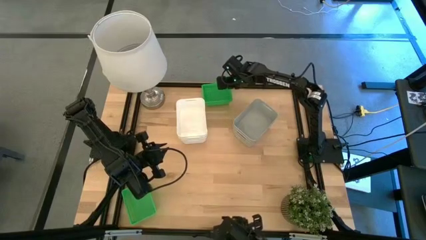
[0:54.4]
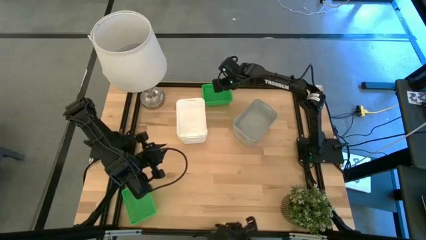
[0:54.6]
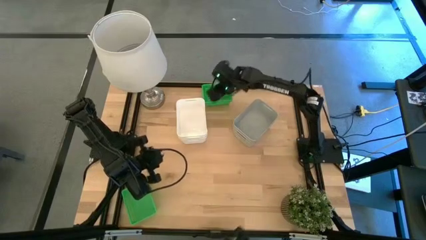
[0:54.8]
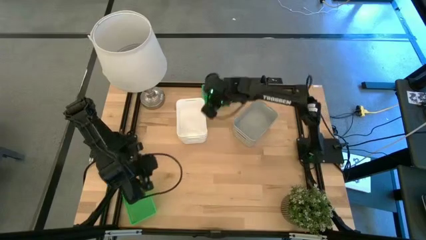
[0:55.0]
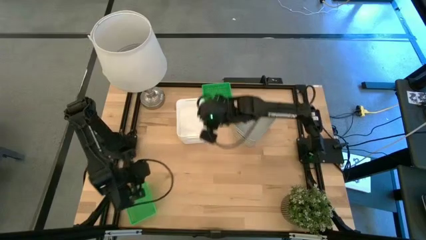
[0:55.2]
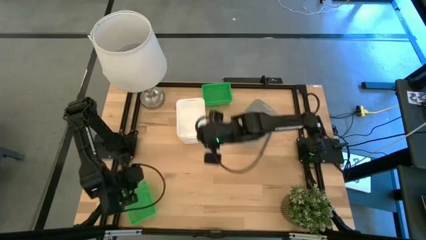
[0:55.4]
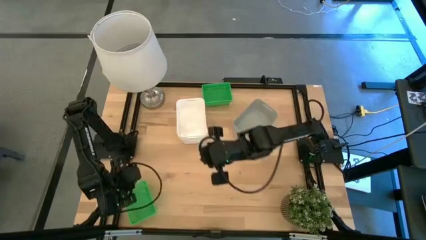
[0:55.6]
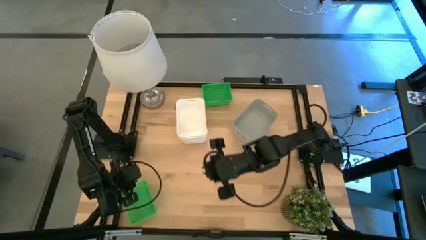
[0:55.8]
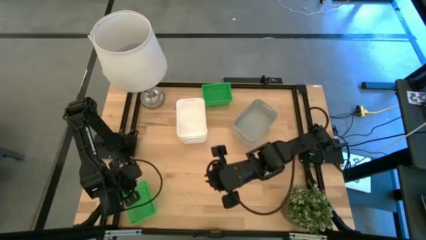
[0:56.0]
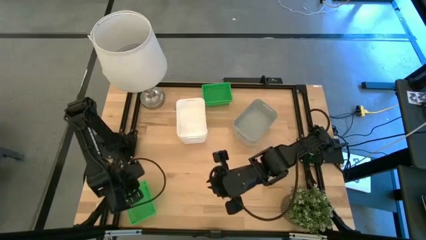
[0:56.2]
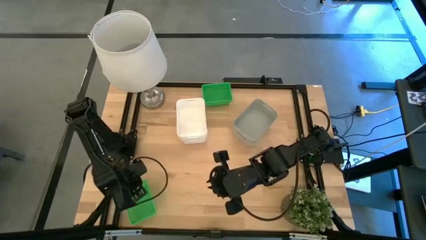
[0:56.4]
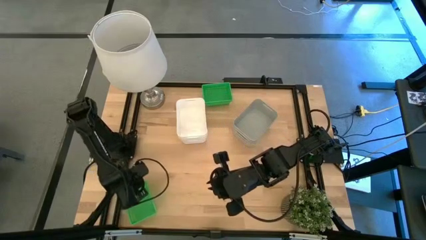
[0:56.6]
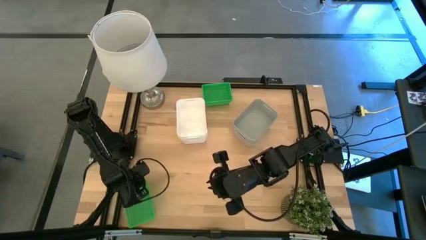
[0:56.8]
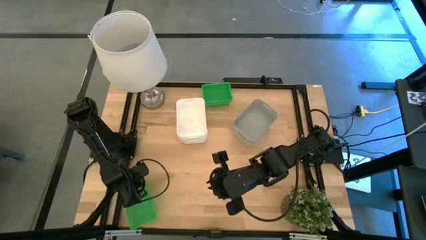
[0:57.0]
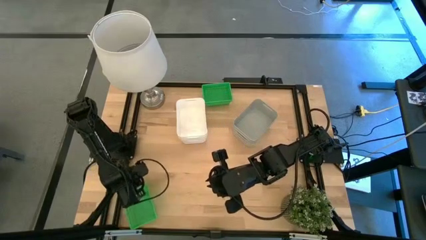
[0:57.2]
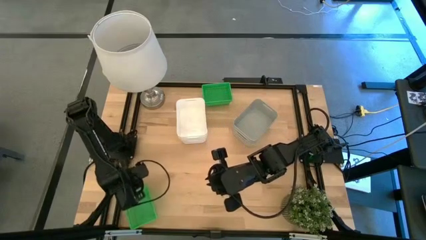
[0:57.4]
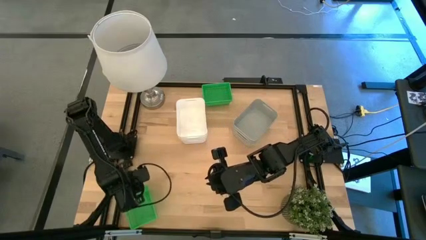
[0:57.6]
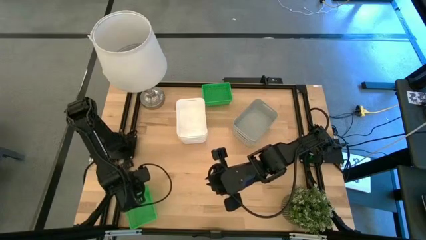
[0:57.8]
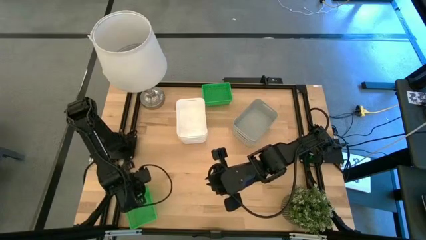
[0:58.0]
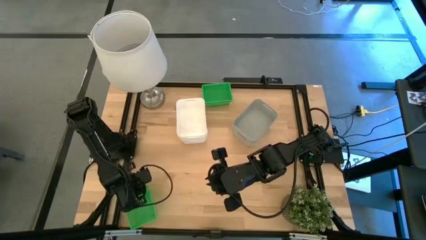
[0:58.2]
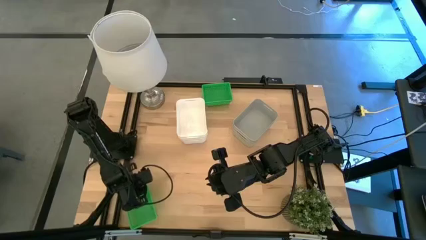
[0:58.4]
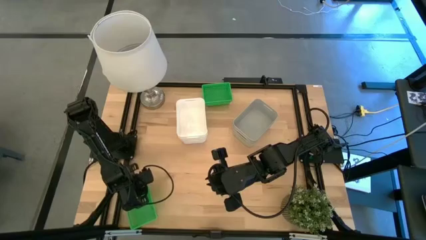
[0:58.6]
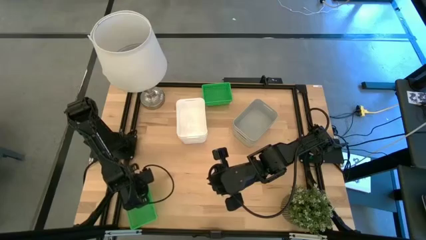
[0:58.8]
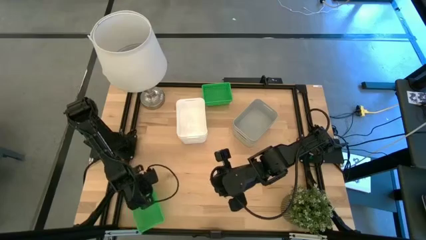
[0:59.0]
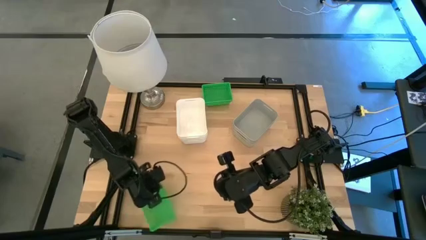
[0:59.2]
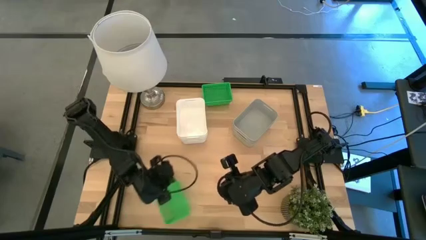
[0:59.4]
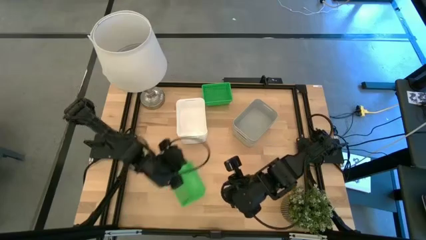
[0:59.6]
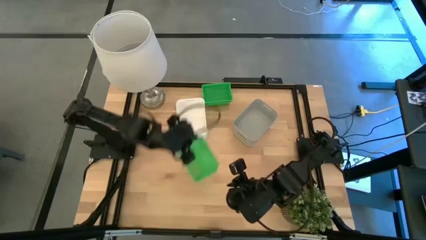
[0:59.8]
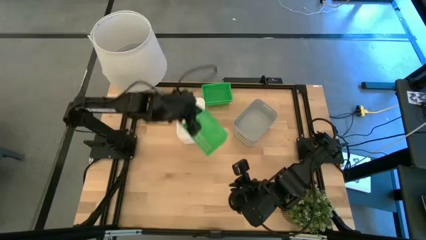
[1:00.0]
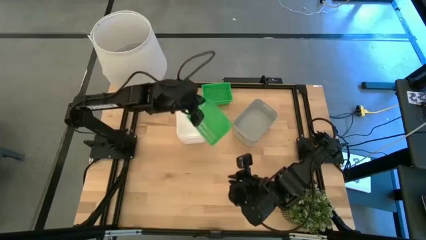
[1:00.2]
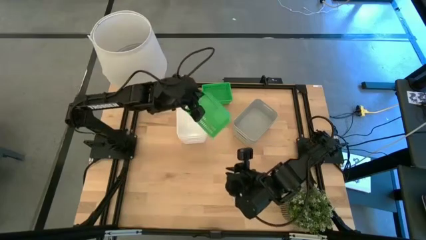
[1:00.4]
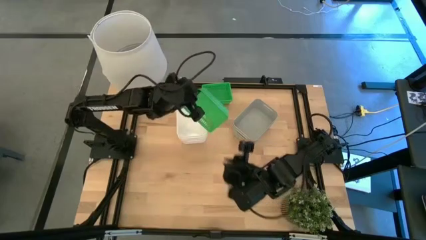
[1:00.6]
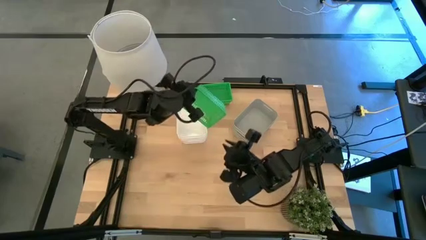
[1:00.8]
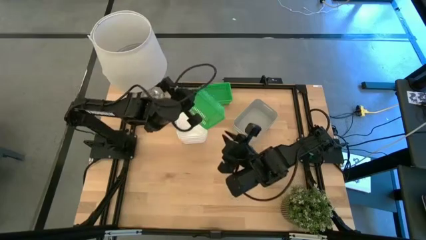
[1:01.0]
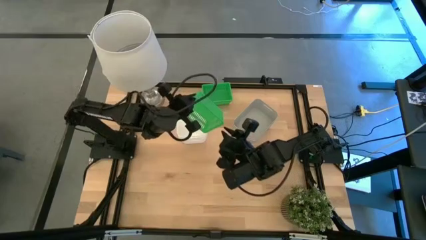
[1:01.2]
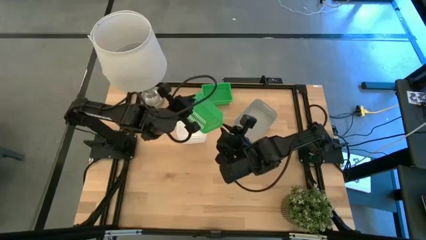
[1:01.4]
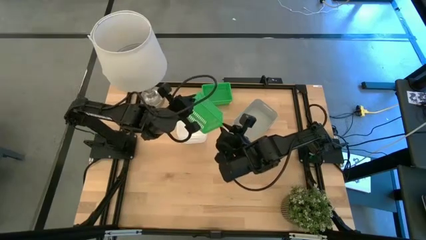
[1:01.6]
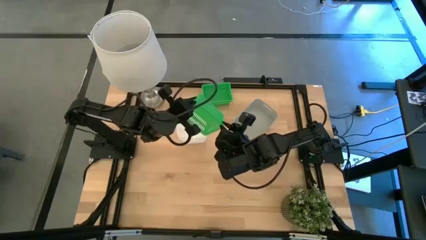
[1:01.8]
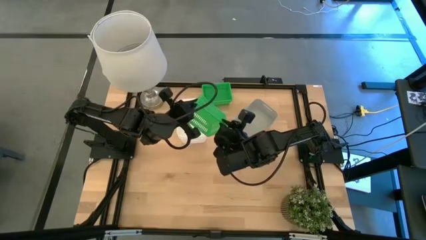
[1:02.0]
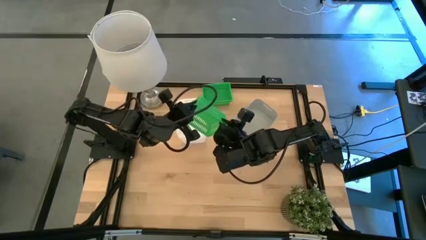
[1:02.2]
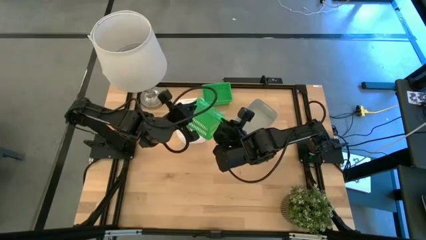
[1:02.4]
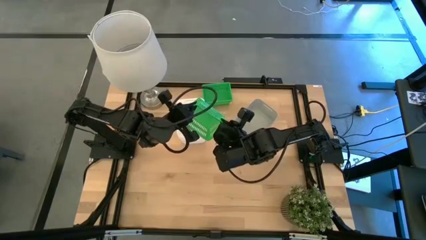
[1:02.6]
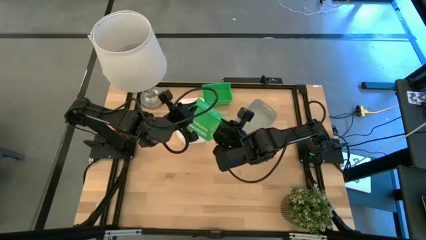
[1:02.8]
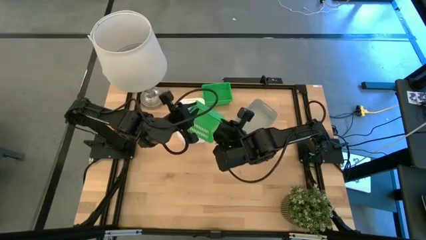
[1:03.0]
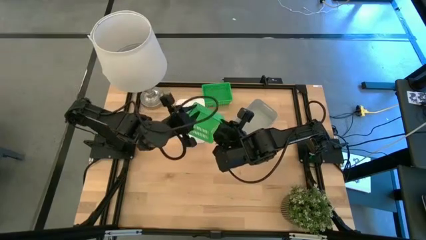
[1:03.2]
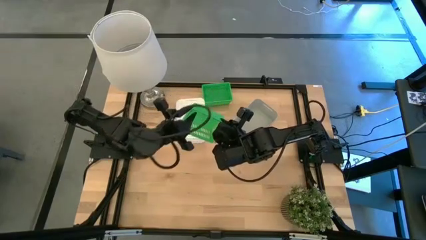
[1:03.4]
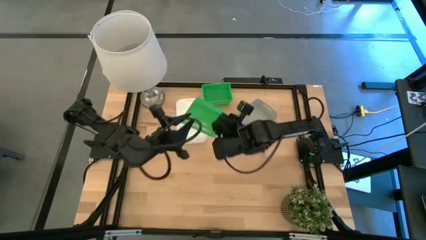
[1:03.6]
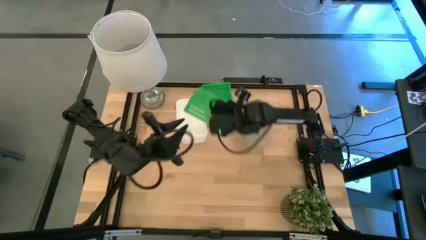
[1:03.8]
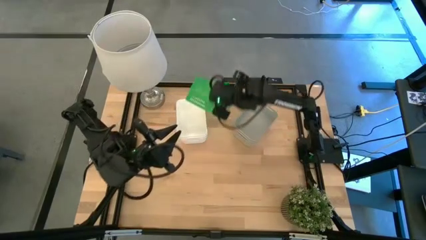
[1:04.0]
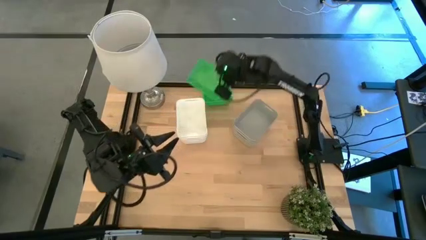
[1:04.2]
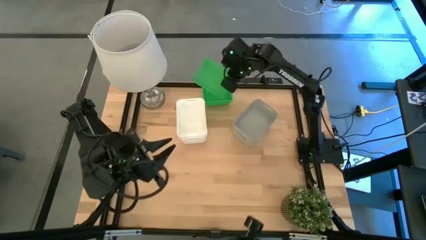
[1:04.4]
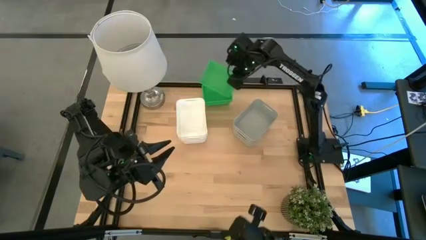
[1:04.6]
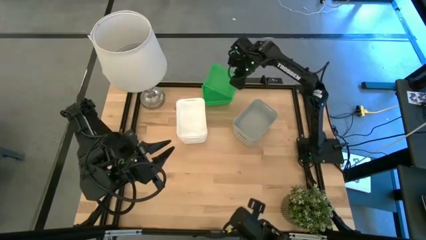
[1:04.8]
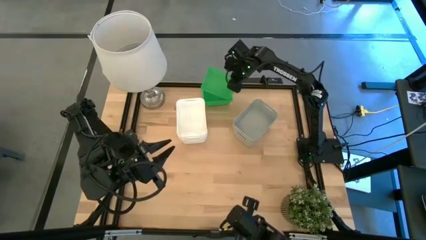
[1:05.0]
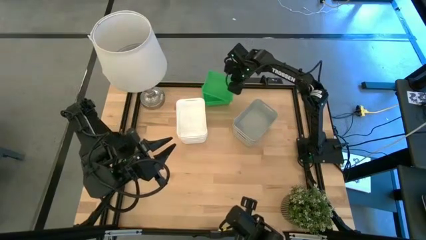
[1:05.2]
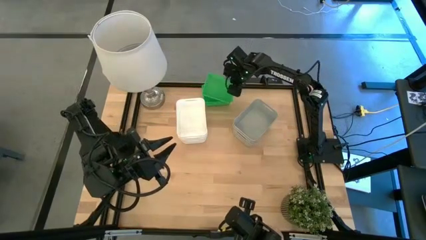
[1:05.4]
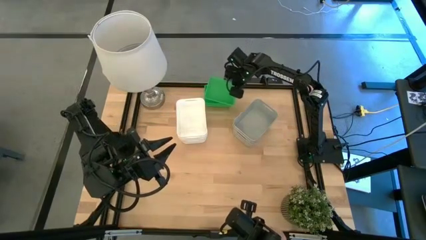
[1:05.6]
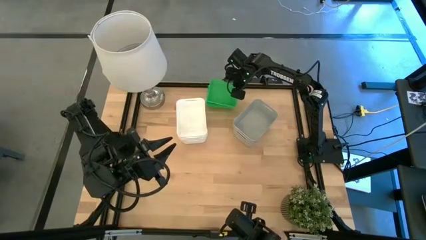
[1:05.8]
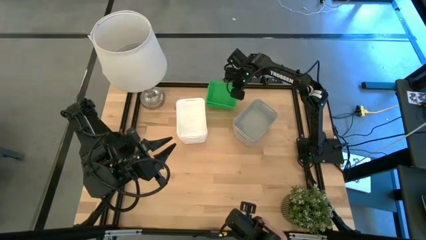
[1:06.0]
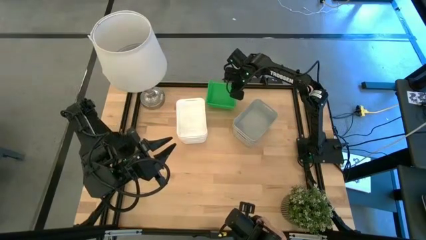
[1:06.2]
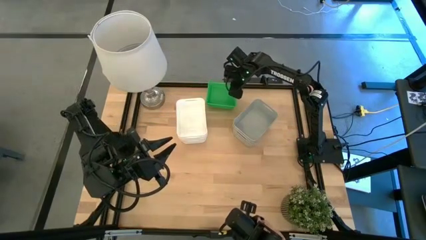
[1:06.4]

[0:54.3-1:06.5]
Stack the bottom green bin on the top green bin

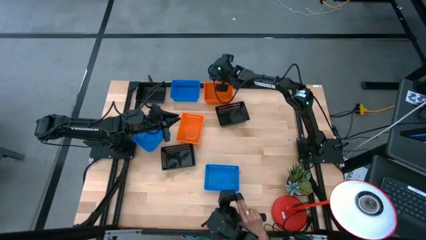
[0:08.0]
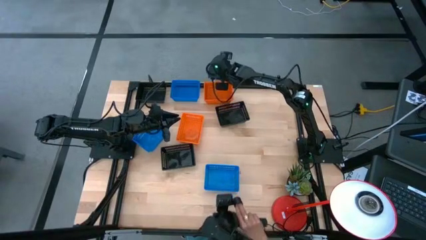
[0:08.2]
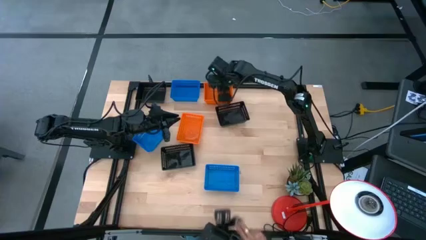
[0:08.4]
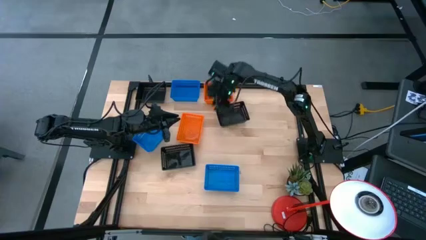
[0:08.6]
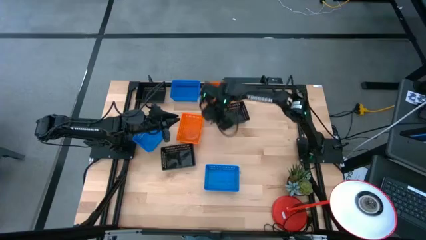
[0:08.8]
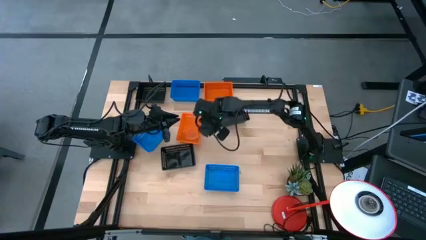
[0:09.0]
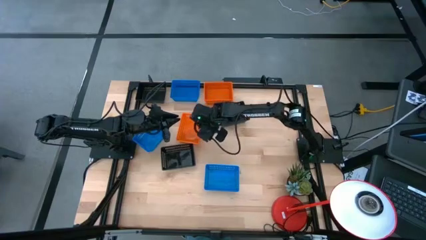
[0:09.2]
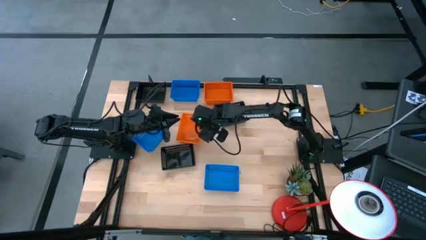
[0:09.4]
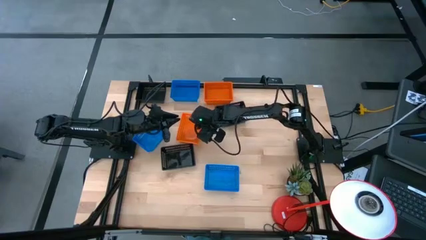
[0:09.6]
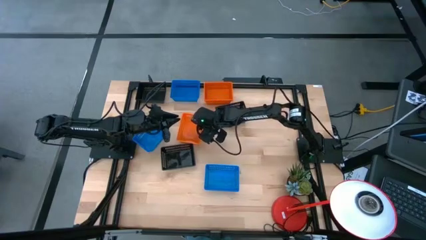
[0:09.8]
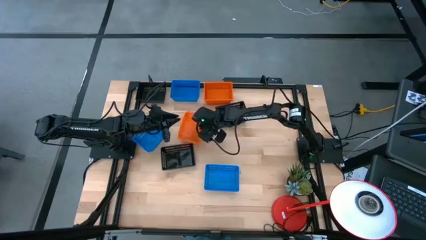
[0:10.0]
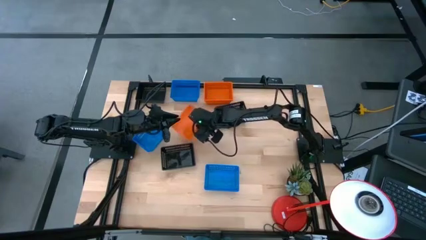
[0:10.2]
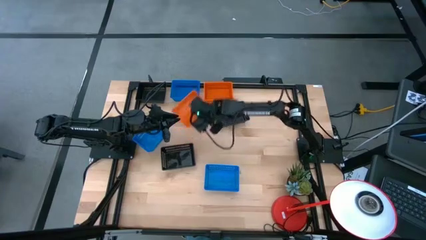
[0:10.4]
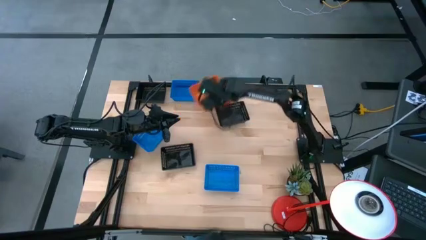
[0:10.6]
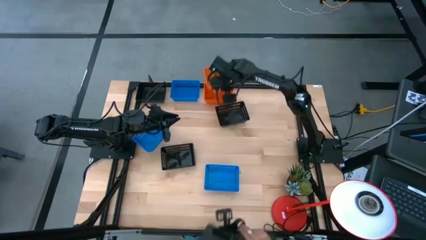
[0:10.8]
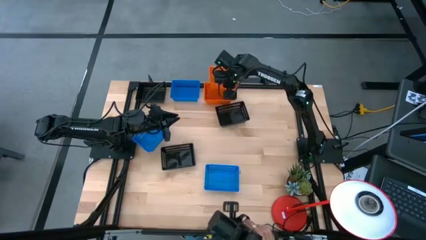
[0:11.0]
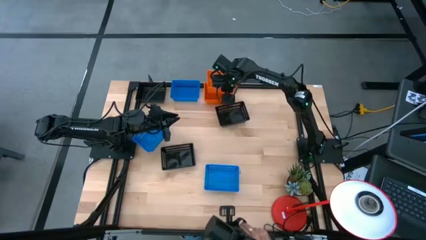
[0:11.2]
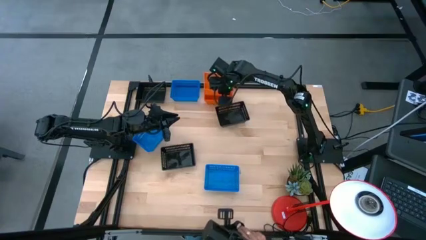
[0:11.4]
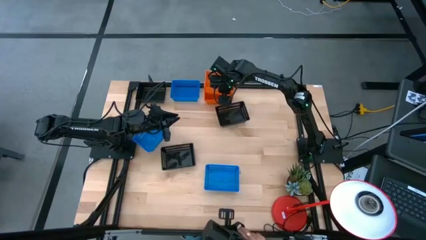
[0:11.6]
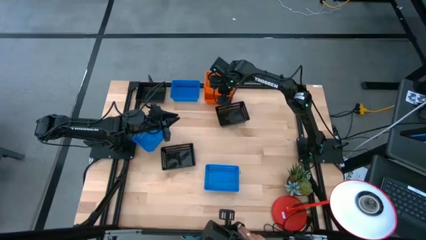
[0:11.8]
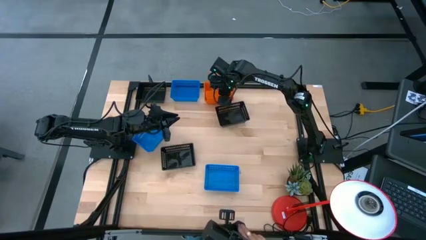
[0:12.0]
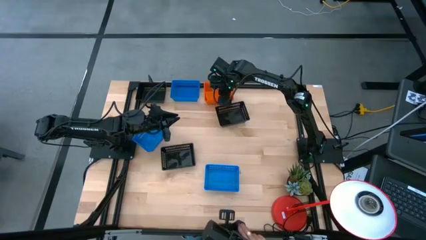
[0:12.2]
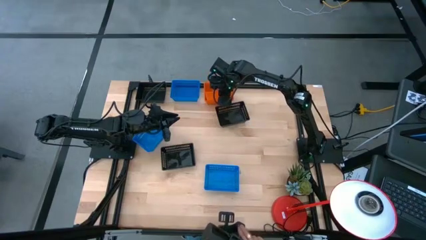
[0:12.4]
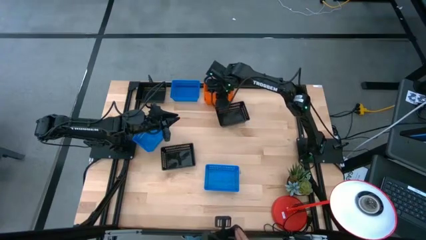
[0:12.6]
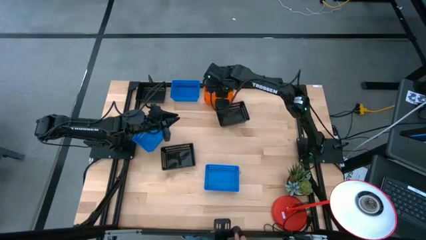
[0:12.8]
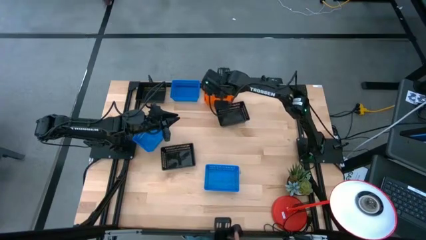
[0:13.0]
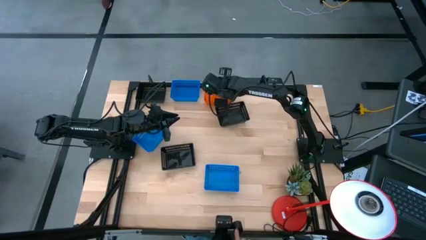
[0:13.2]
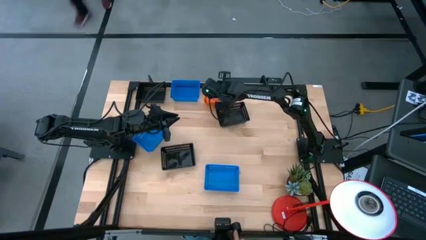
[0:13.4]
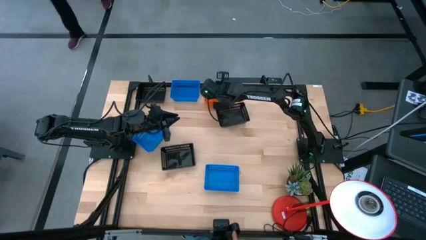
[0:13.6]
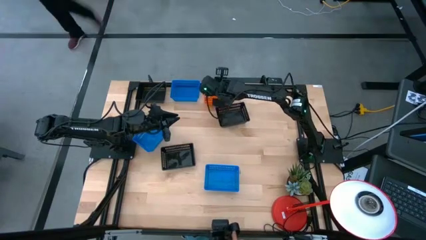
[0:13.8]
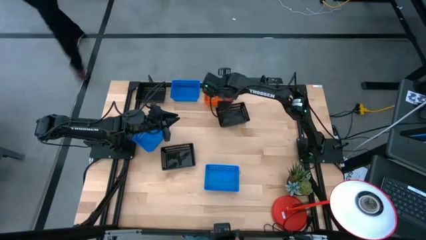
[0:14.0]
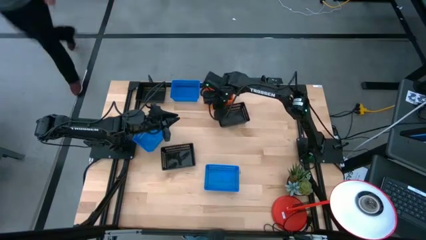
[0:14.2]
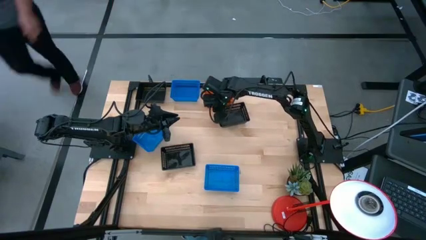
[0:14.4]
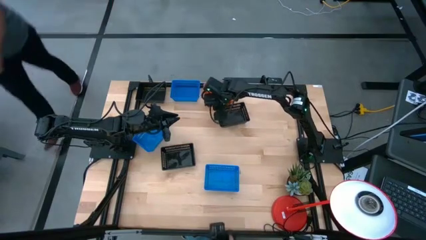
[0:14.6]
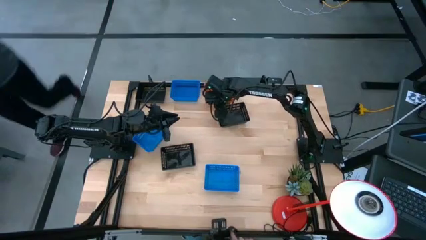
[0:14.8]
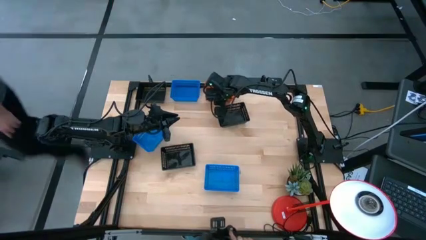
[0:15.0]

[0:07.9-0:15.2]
Stack the bottom orange bin on the top orange bin
